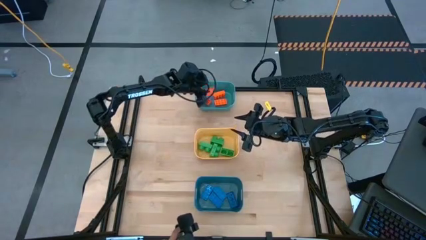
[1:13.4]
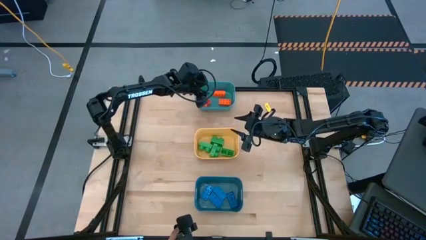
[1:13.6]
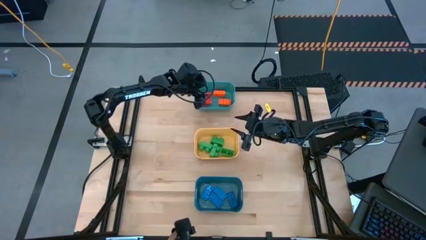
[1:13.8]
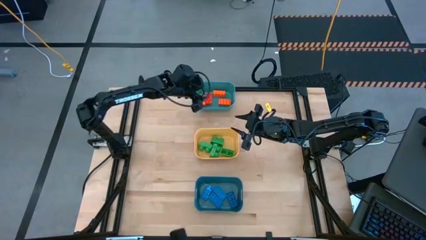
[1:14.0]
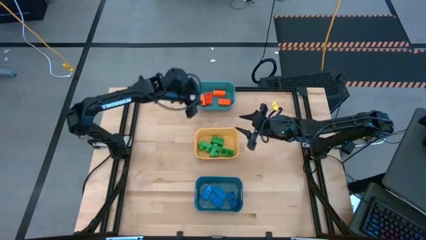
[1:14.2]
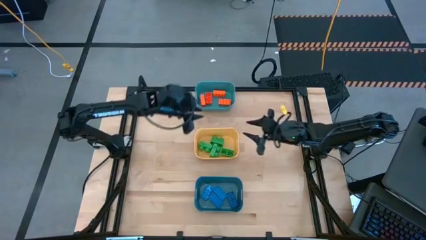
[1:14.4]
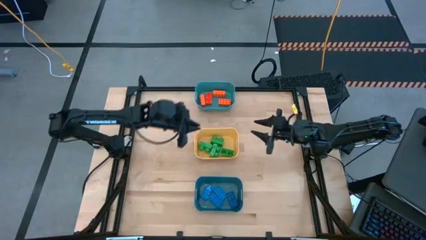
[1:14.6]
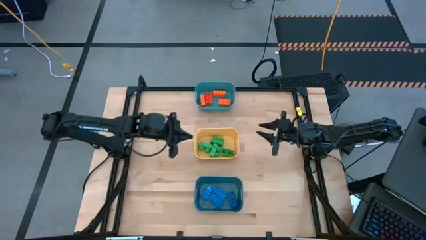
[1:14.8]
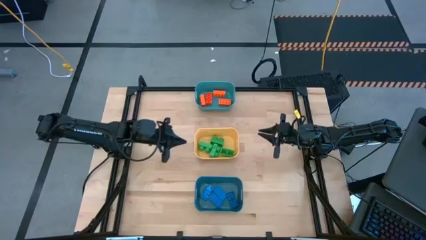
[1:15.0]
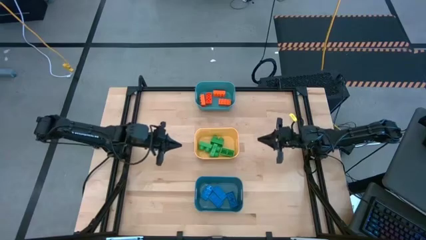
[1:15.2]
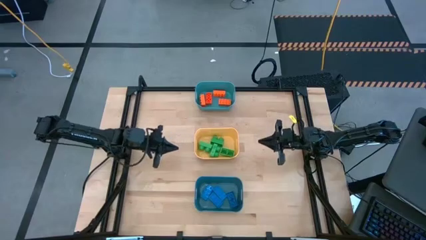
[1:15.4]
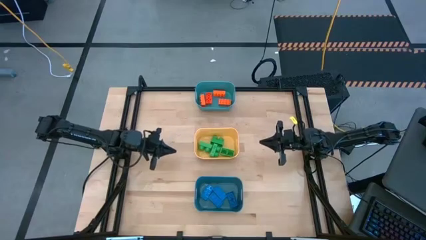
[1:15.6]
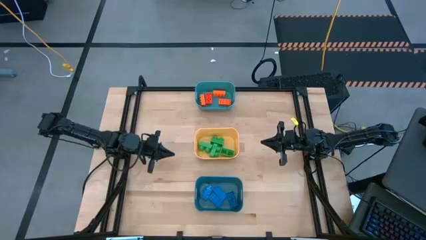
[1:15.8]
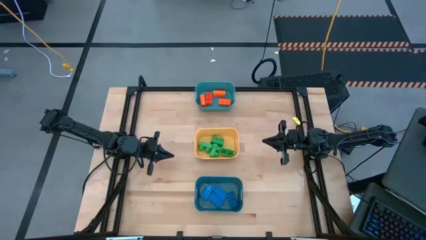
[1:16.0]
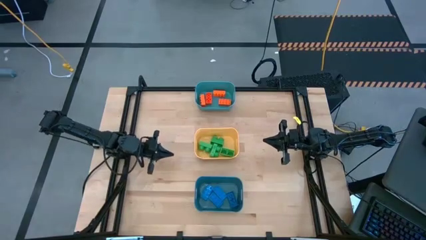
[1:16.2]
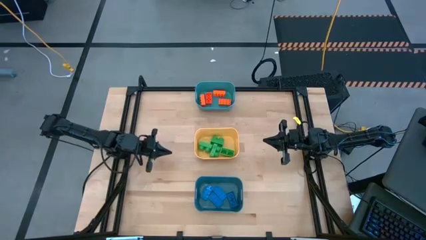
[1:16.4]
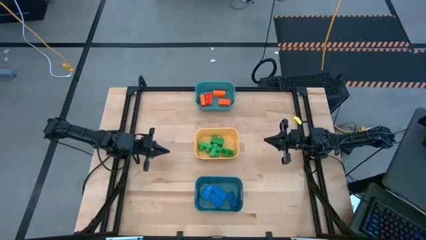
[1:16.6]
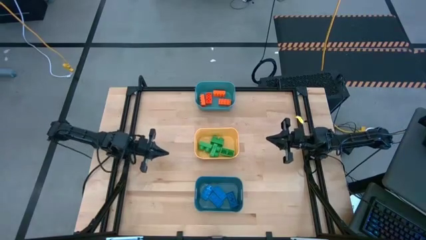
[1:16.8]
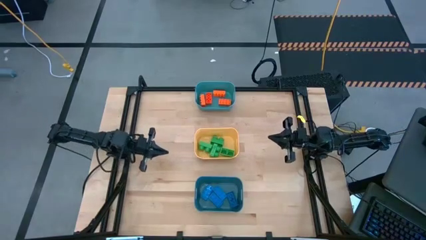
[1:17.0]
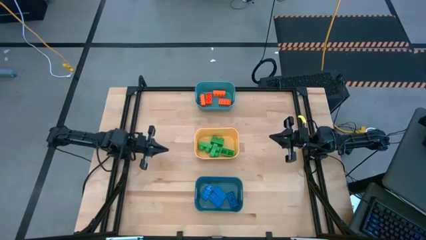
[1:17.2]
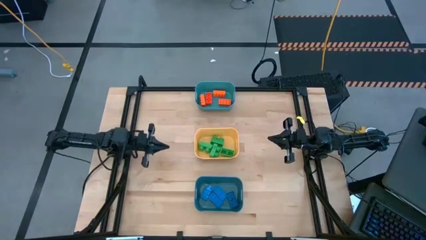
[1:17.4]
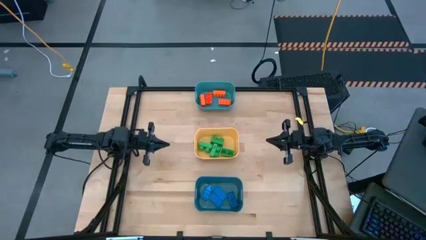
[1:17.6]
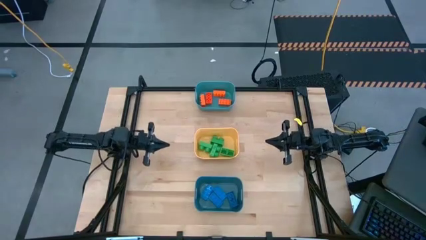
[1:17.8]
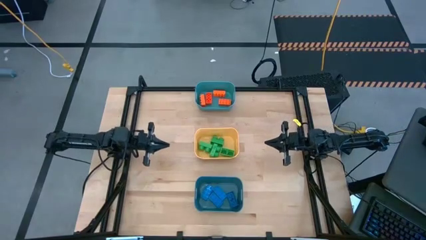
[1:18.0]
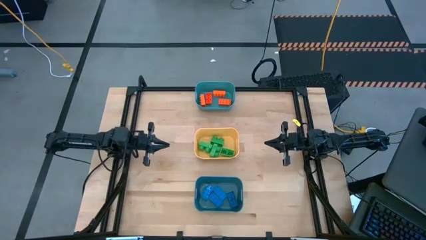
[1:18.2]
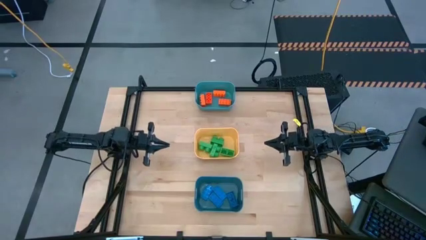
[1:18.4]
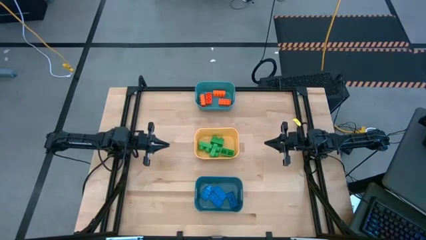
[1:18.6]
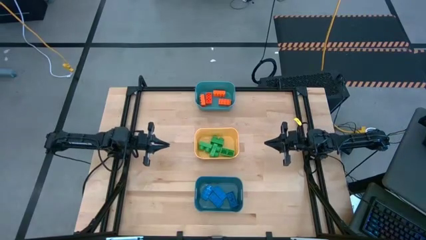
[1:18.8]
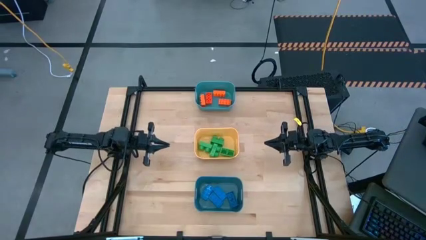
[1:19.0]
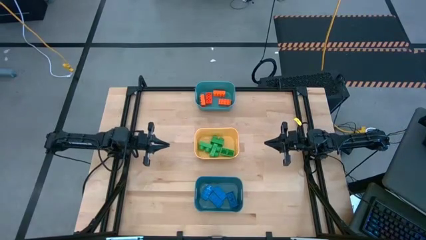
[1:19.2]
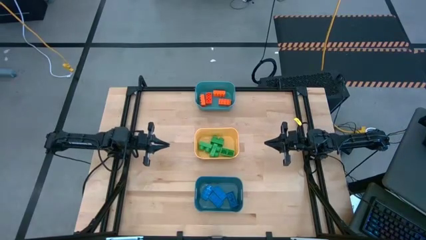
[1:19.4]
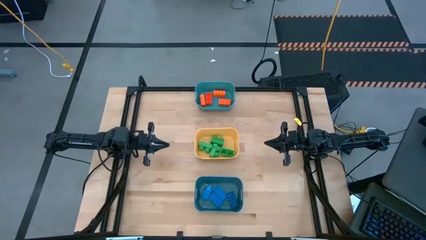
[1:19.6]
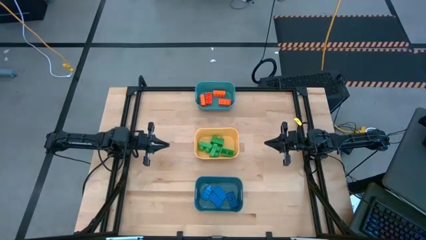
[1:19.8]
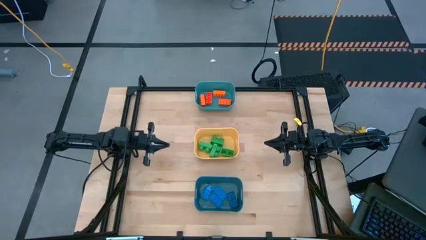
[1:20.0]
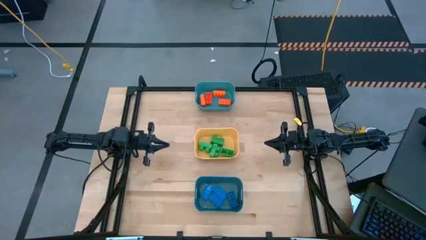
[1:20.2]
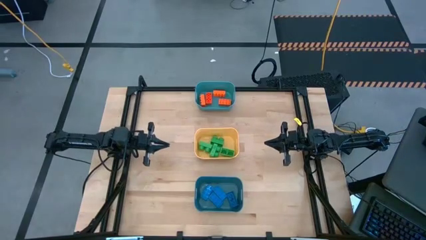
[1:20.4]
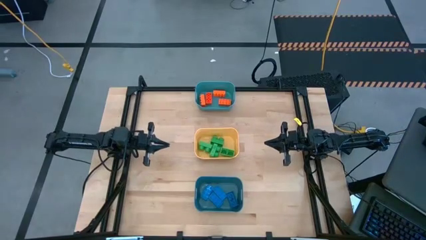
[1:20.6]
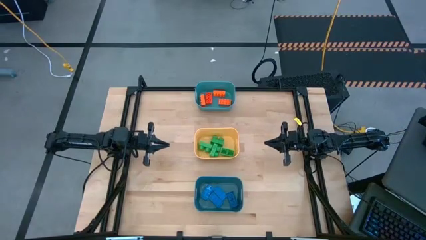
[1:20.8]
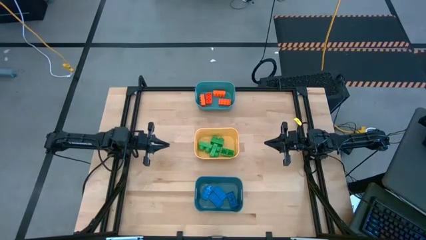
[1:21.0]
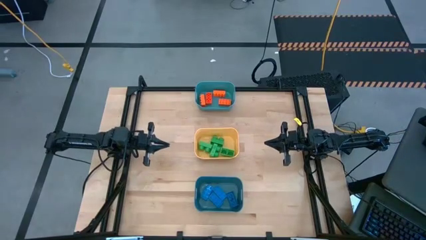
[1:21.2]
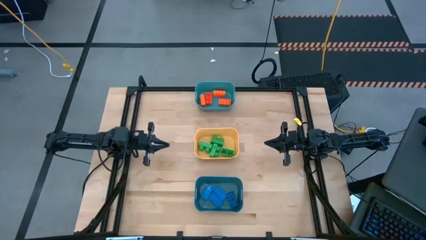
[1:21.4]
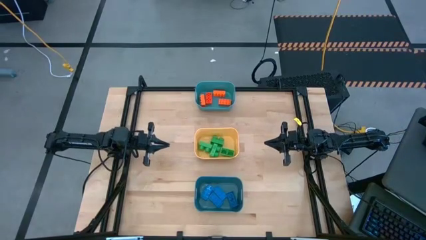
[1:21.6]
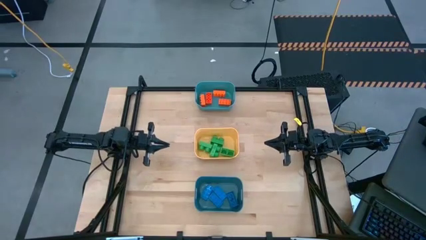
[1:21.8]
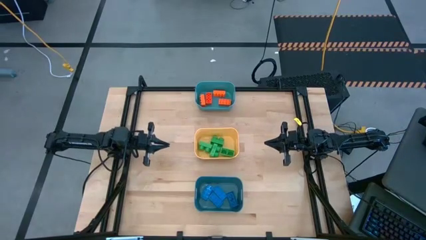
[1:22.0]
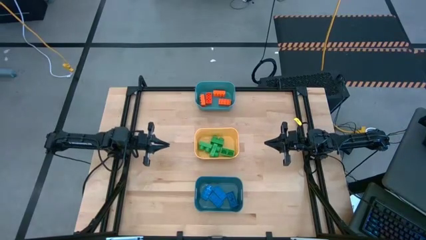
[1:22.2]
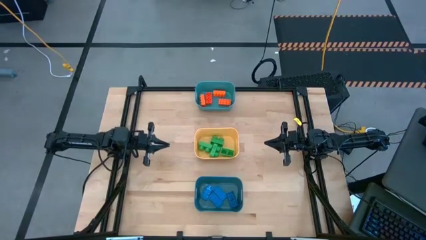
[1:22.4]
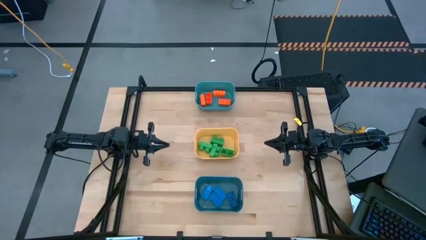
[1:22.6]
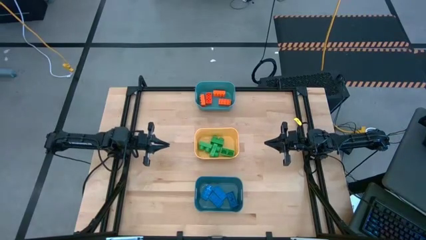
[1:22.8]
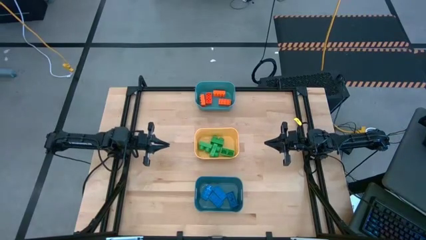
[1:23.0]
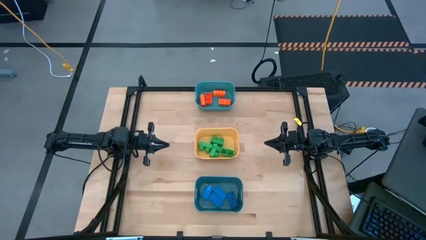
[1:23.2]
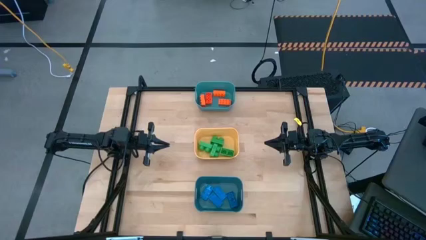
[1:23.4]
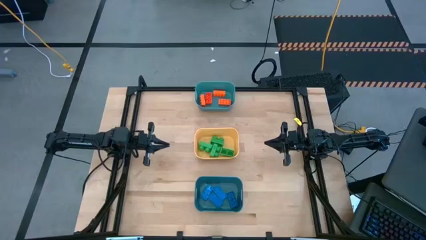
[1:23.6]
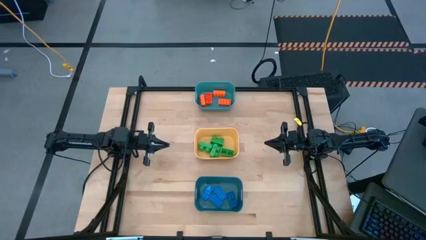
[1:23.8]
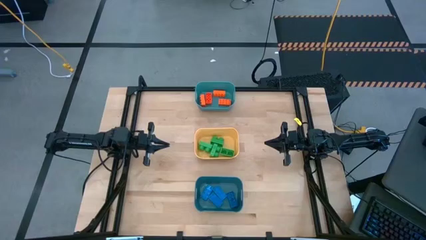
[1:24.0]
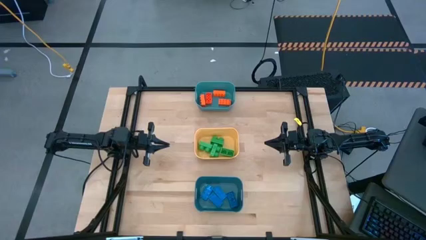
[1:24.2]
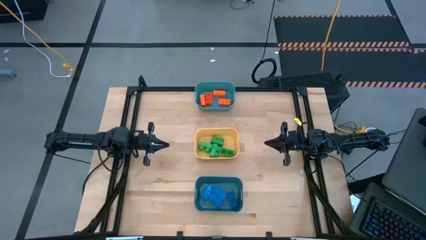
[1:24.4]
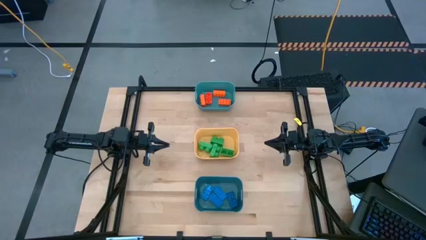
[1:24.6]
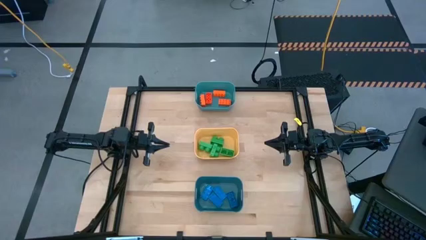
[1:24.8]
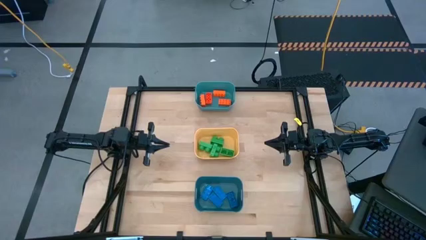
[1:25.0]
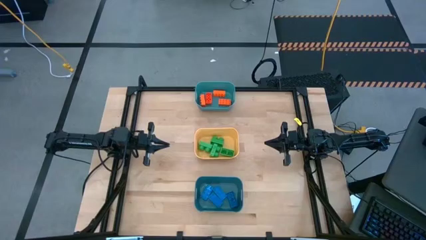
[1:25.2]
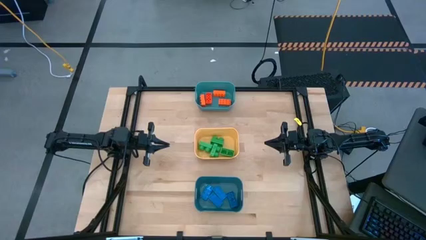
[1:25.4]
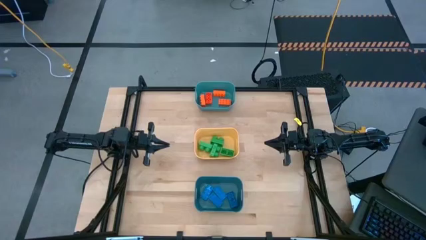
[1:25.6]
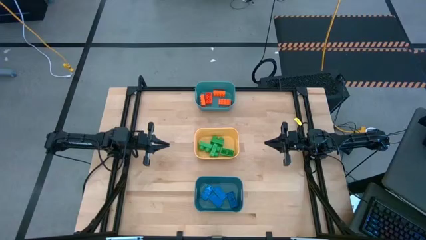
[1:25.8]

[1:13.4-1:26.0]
Task: Sort & place blocks by color
Return to Home Position

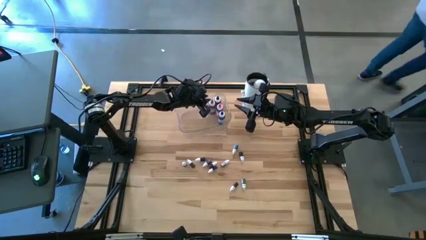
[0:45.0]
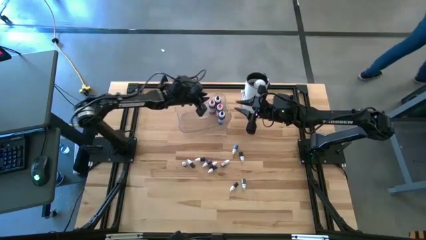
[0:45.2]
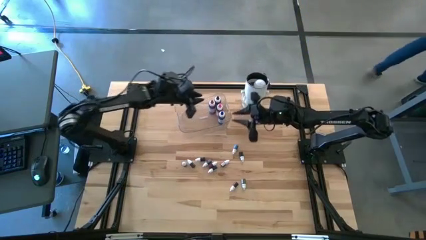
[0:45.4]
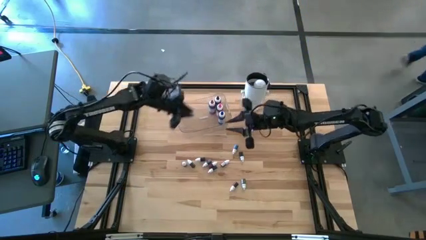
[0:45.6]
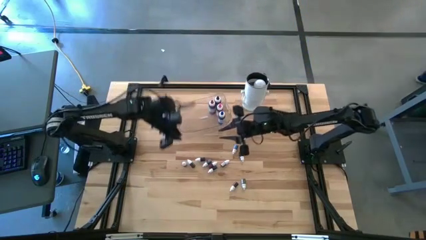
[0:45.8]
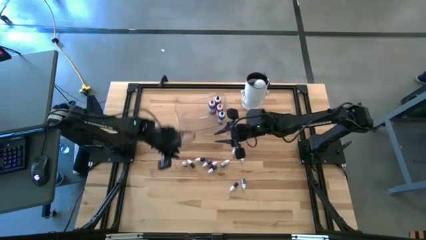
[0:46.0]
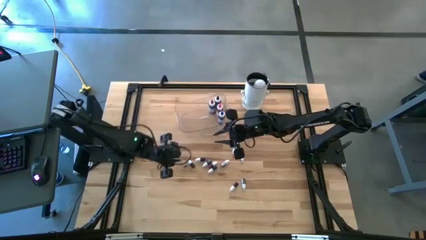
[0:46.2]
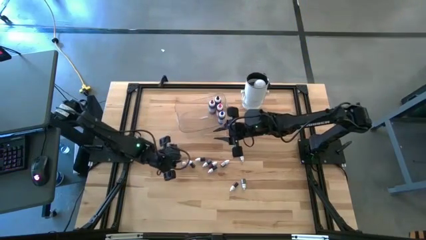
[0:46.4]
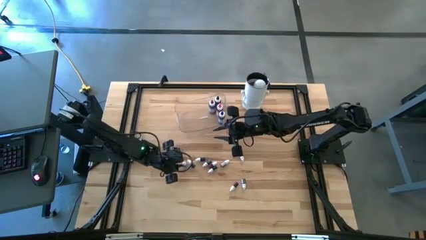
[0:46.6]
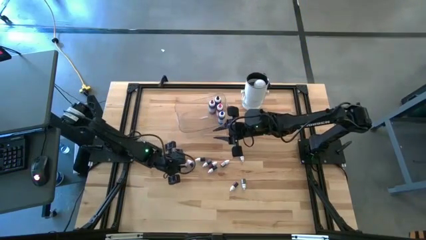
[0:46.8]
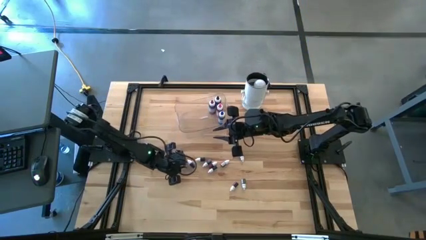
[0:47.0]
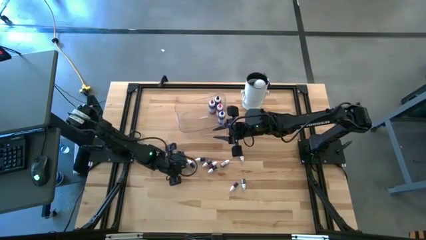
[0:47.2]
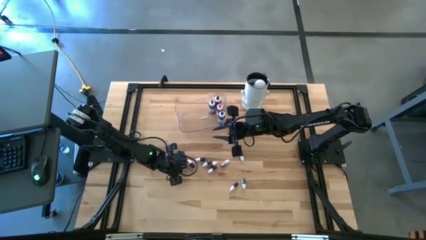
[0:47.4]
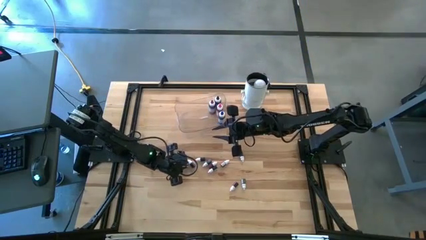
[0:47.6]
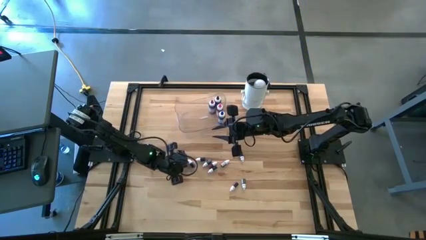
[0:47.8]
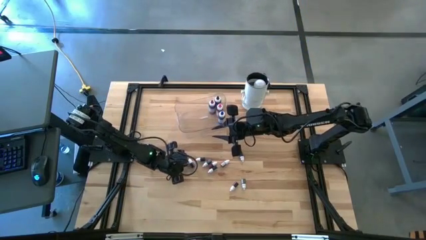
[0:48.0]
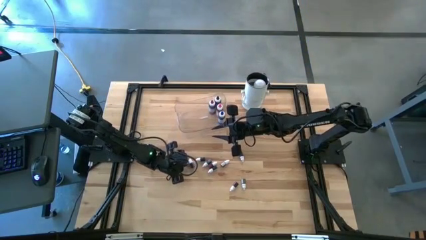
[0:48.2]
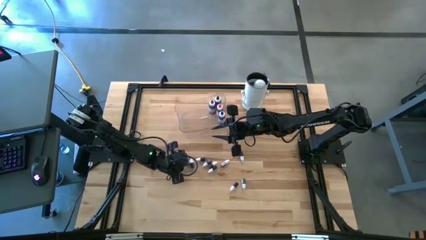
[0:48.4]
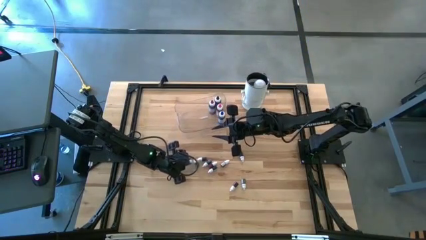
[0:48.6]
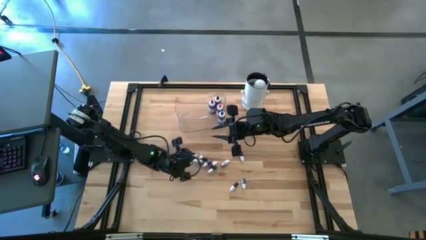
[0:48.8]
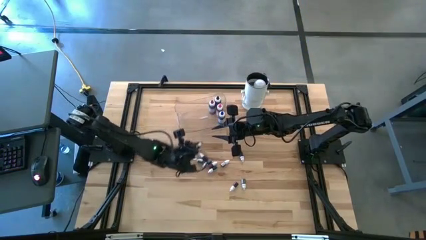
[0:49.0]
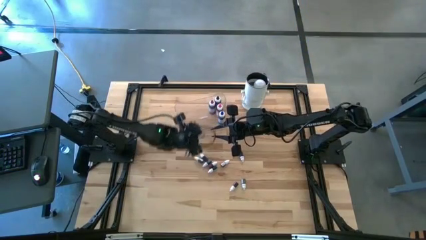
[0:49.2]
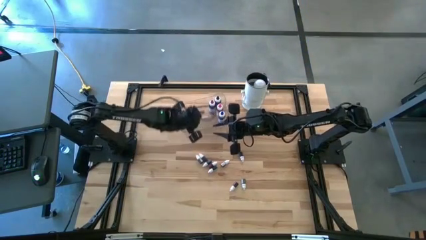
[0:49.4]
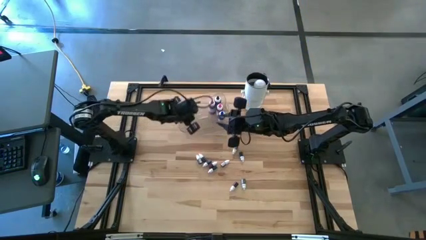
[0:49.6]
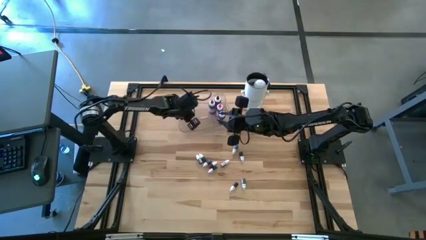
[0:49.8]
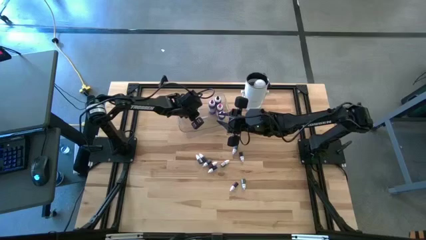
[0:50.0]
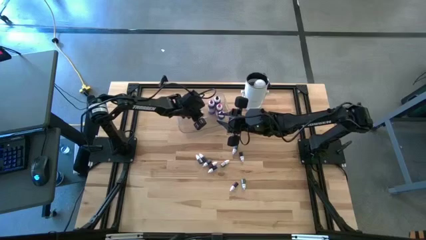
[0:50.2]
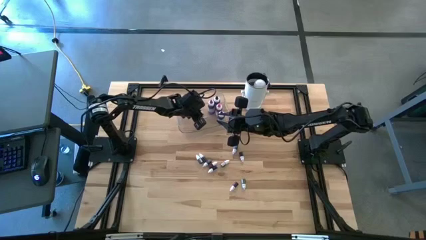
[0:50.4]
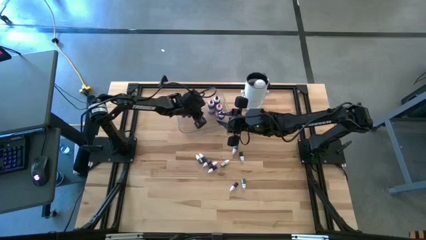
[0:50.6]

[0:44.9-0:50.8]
Task: Pick & Place food coloring
Put the small purple food coloring bottle into the transparent container
